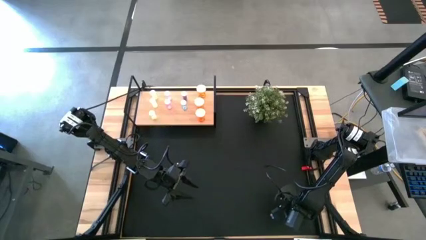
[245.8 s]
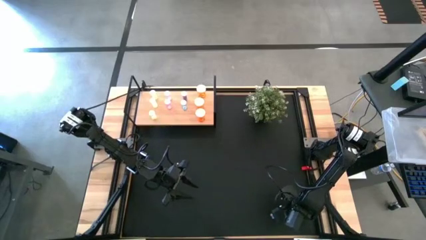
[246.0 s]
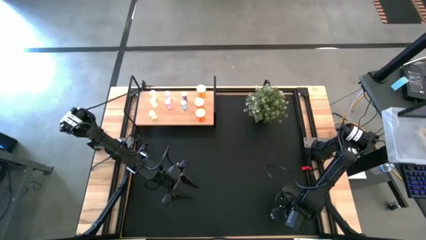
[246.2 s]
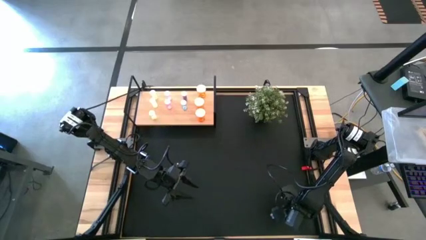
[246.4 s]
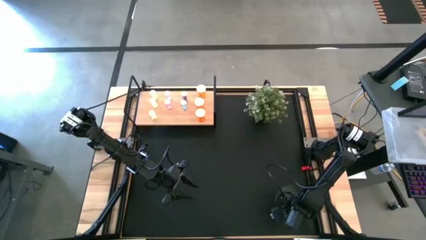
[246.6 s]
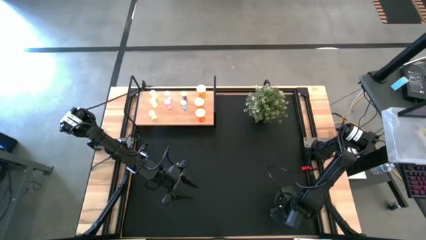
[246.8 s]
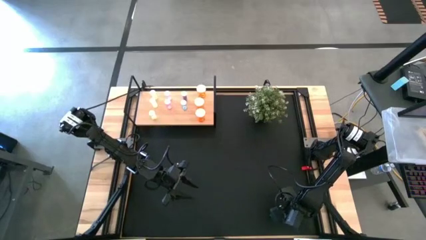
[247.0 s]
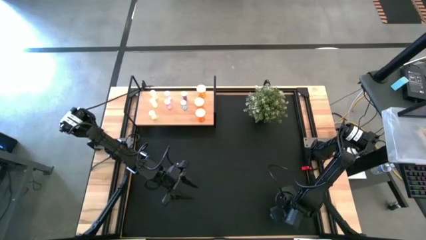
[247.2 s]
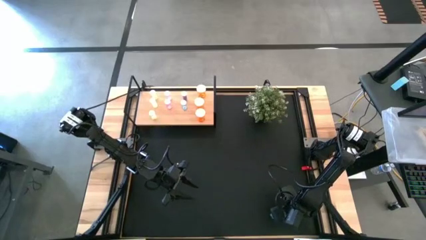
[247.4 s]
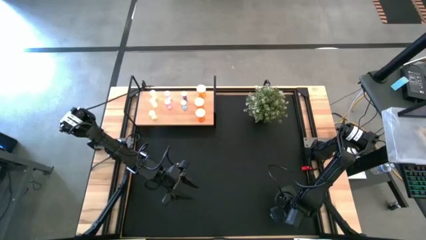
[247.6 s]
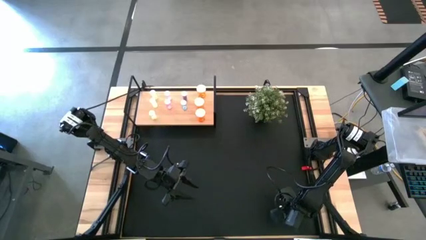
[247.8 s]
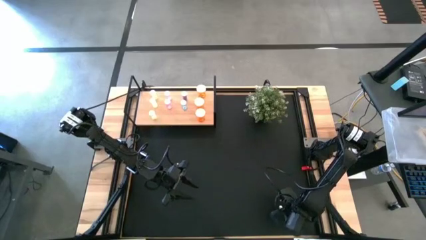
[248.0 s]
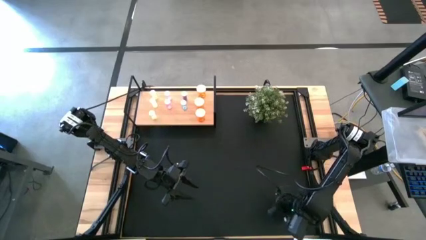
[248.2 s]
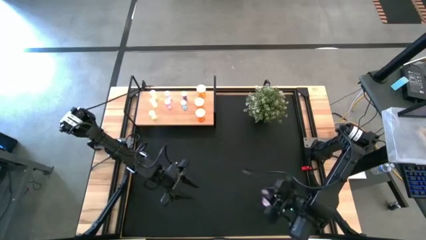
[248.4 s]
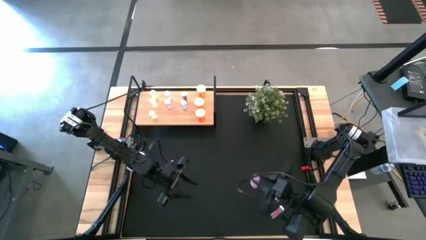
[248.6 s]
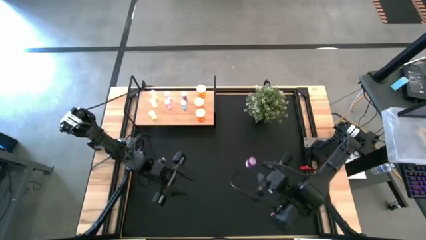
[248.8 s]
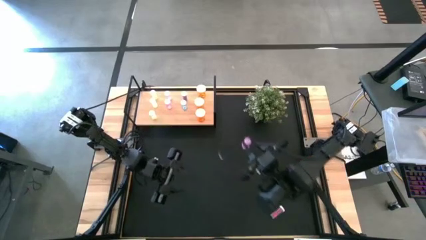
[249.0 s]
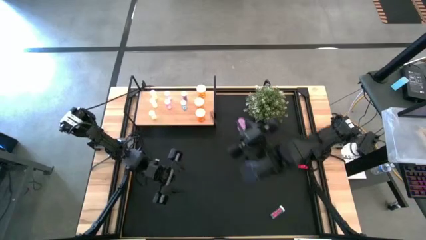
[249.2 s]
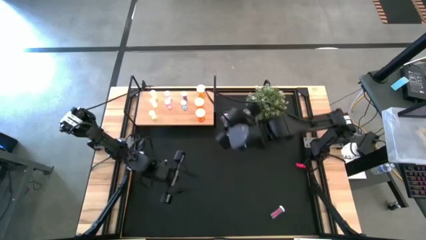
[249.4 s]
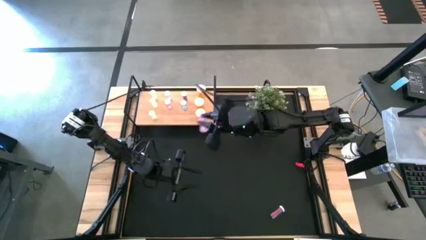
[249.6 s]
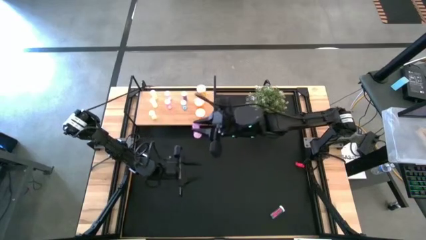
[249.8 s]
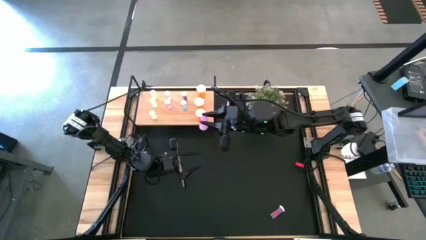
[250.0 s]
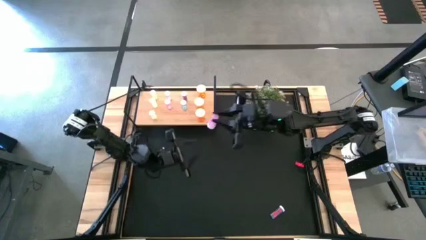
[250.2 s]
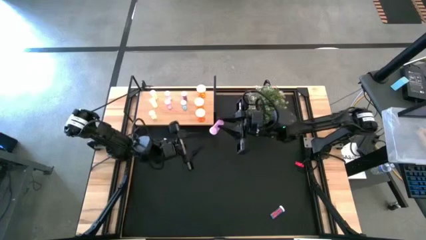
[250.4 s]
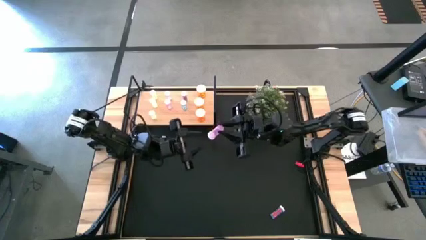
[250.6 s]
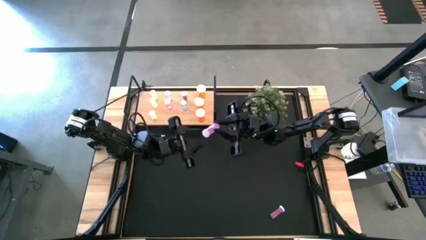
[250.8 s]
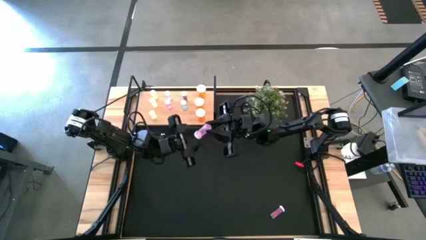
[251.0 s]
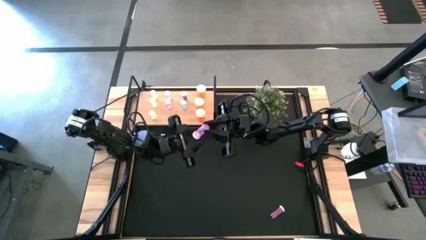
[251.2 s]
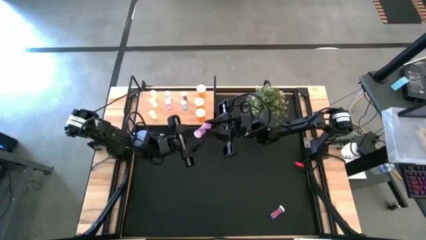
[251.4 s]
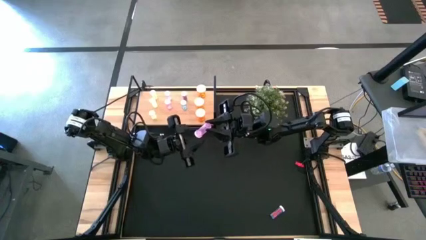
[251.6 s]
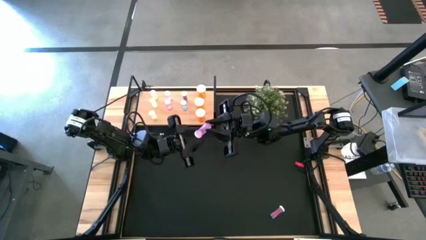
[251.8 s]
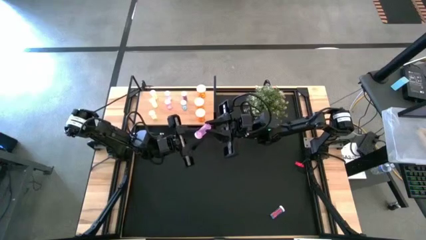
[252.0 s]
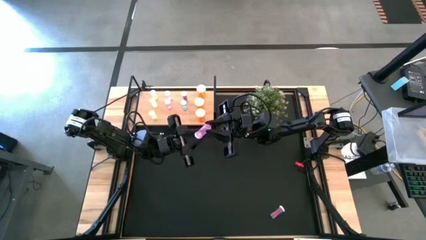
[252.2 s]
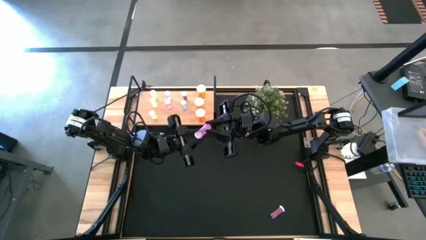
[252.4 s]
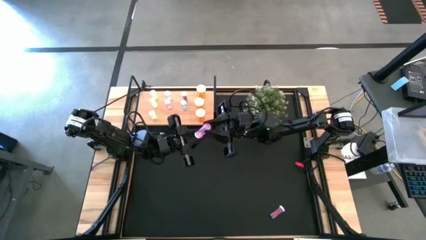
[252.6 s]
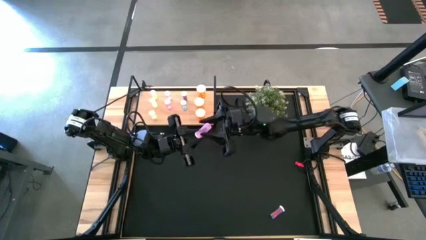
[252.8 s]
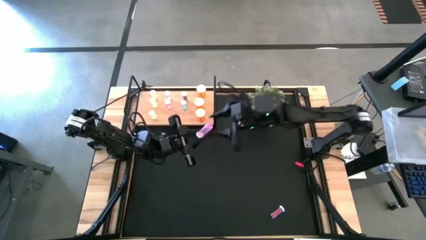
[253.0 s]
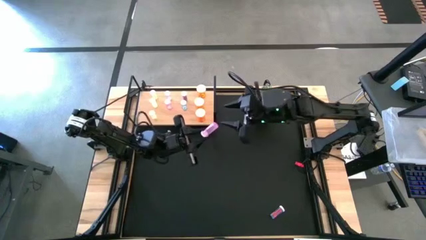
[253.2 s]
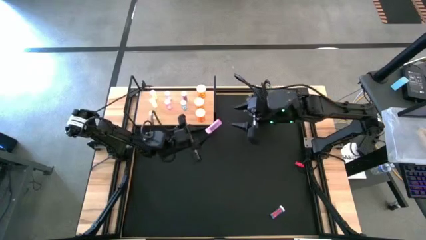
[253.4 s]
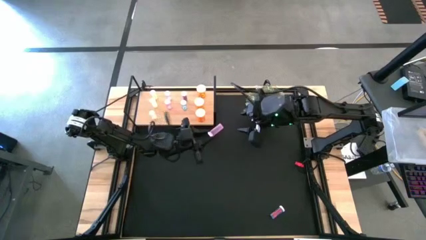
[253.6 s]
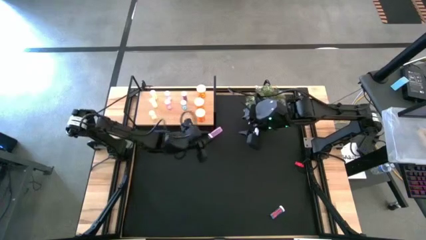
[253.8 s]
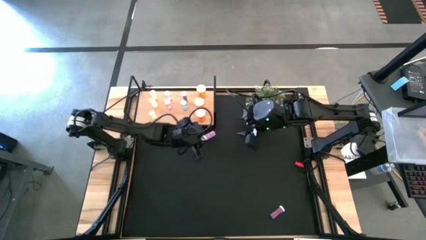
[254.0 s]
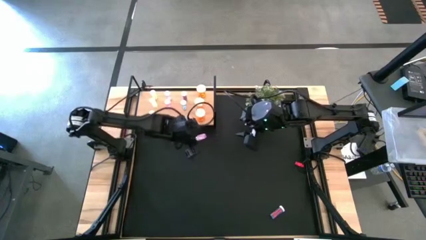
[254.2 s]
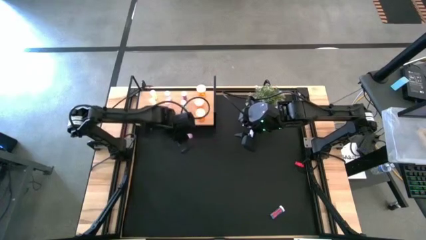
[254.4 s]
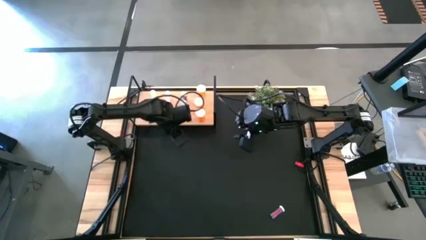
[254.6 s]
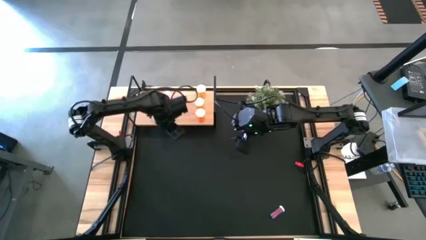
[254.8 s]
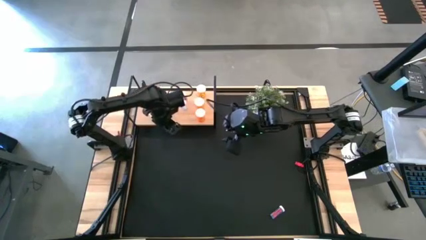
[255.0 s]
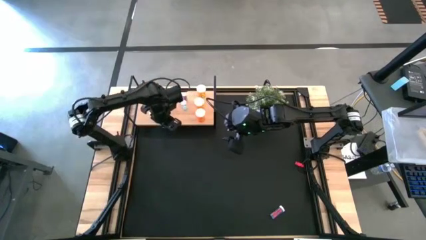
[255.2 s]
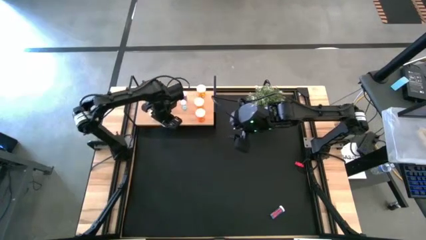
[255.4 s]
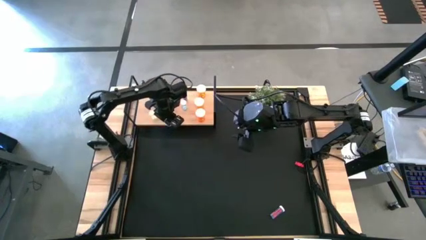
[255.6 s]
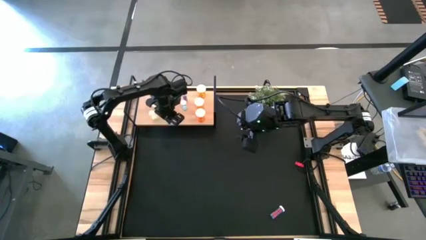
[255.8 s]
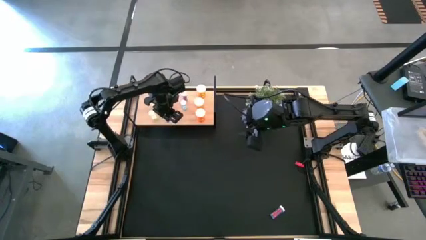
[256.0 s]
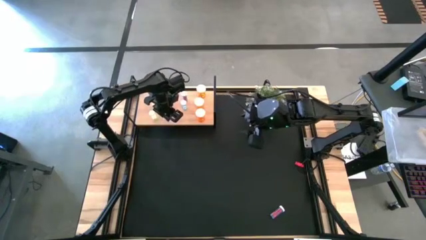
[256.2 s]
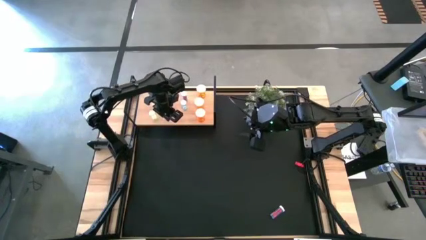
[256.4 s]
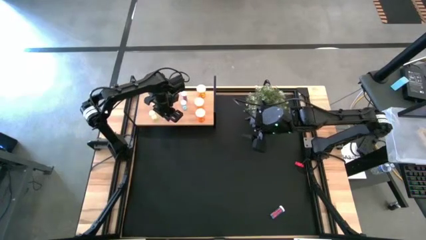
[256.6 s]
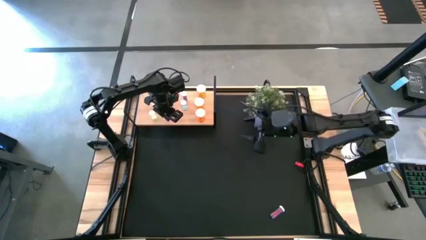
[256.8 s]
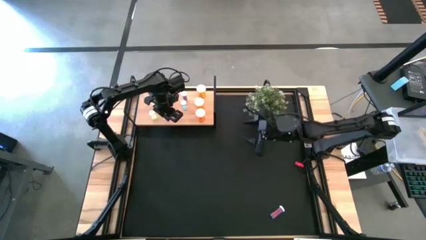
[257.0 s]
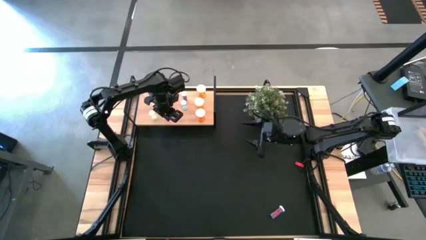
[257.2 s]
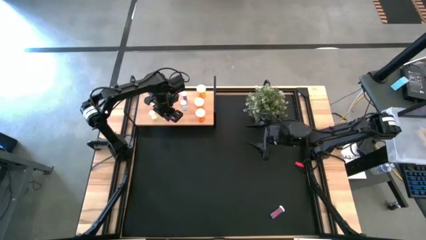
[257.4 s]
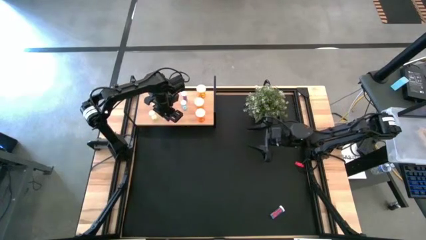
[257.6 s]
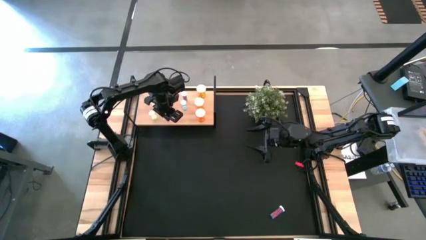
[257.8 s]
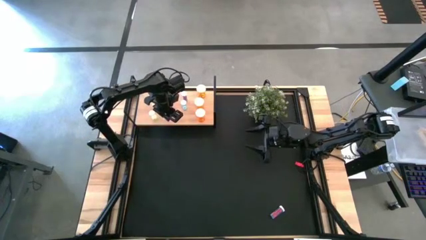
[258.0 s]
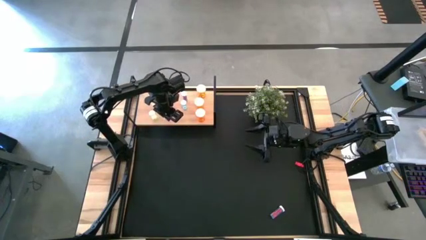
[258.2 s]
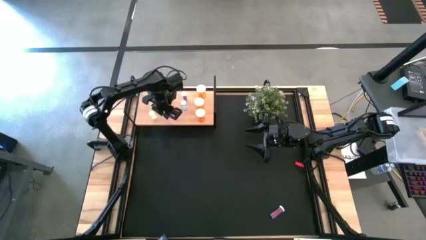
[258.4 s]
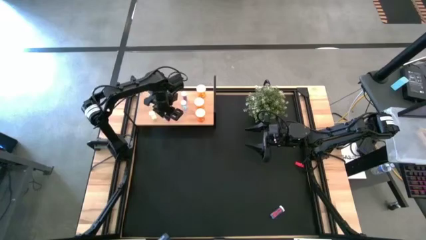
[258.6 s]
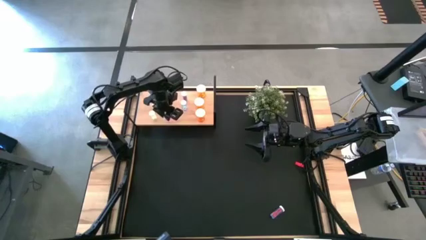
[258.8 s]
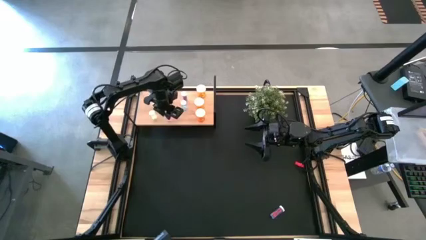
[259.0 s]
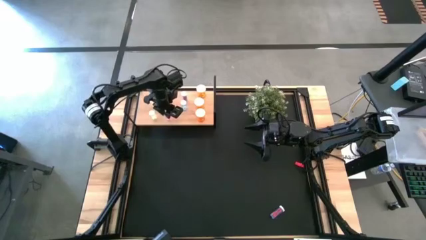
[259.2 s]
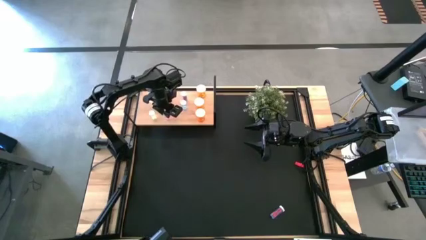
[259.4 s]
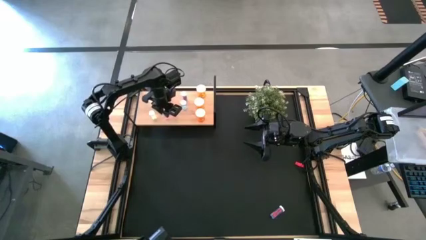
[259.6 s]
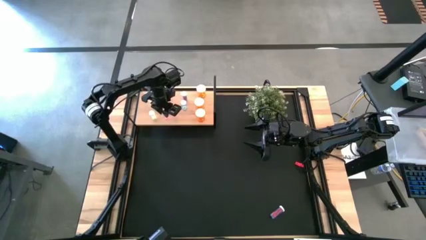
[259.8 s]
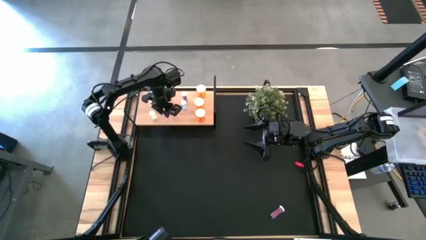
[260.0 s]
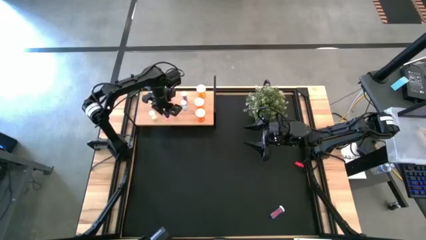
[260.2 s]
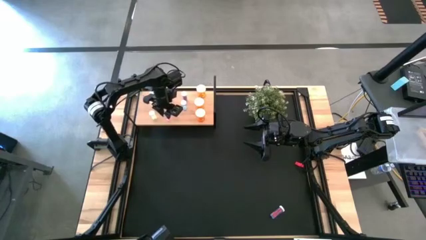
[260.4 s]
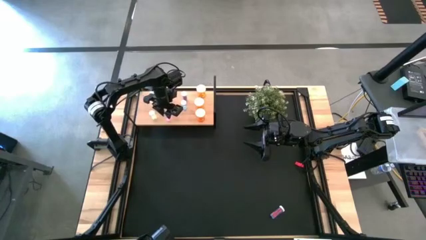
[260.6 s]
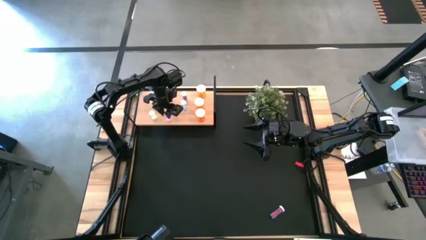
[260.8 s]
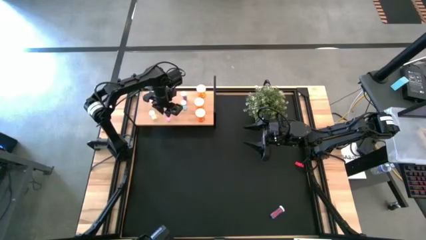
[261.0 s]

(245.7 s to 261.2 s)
Task: Pick and place medicine bottles onto shelf by color
Put the pink medicine bottle on the shelf aligned with the other pink medicine bottles

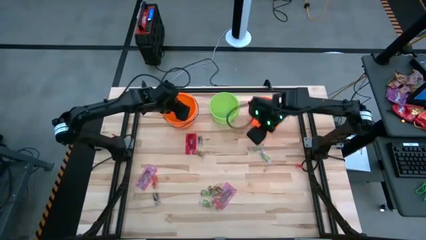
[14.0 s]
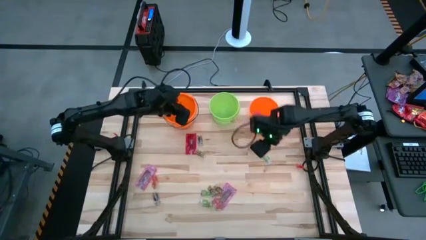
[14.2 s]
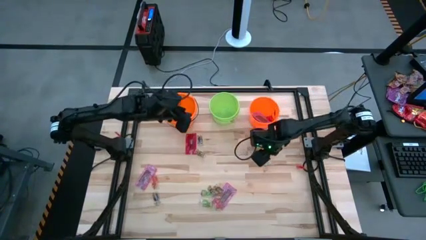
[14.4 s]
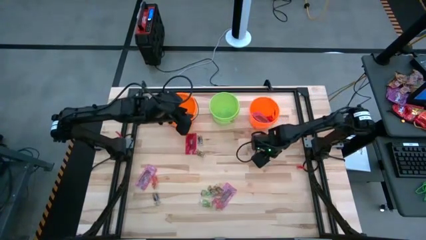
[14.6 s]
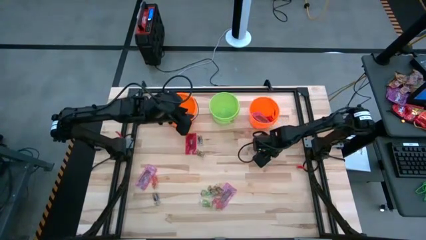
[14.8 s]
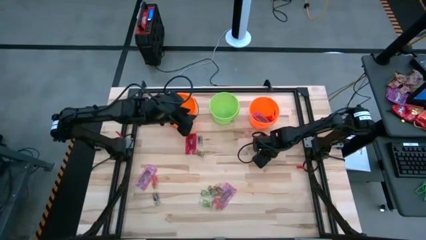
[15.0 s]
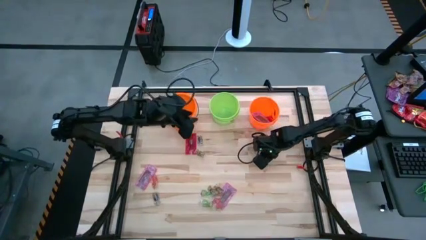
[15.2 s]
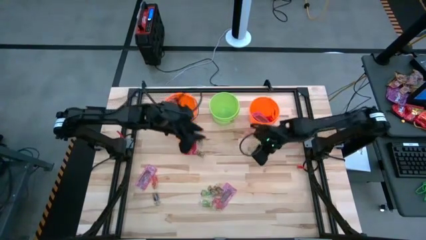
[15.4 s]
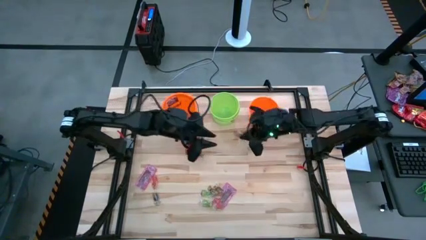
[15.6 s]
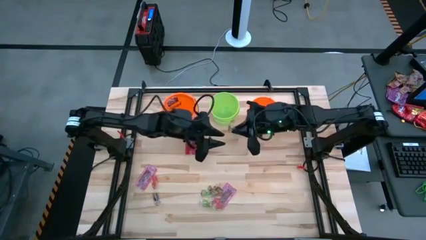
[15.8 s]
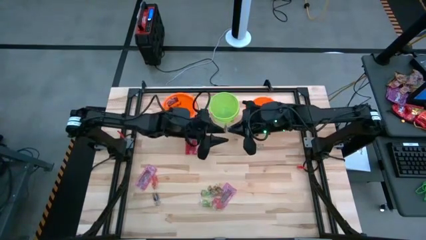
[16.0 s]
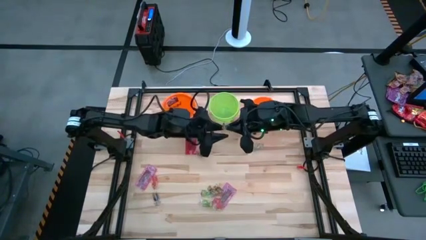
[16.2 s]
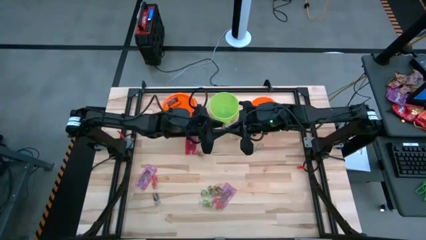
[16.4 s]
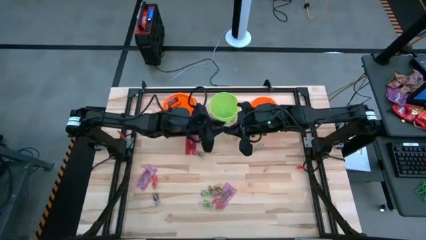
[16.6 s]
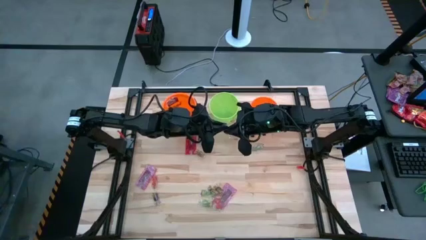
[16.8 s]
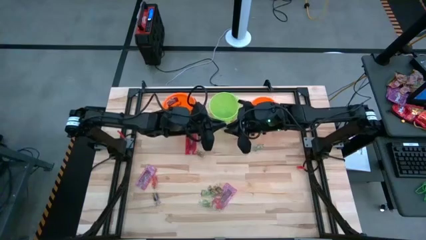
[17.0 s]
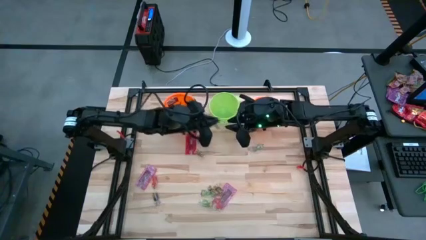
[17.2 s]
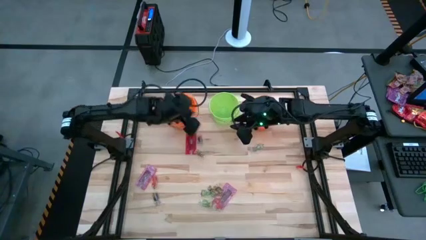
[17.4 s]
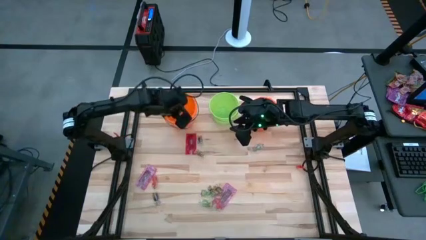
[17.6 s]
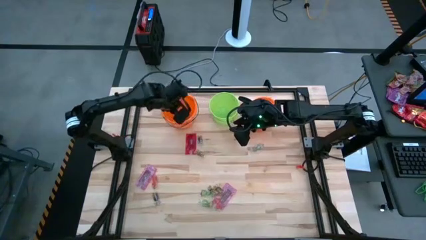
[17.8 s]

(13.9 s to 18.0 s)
Task: Sort candy by brand, put in halloween buckets
Put the green gummy into the left orange bucket
